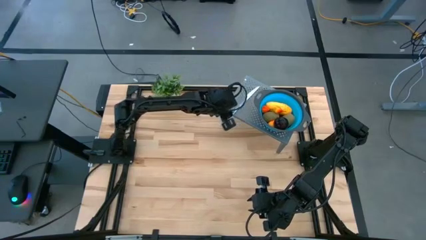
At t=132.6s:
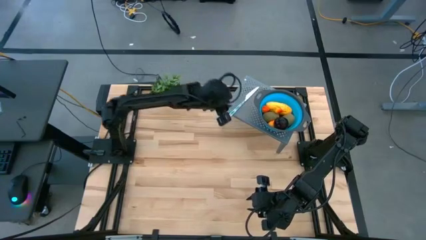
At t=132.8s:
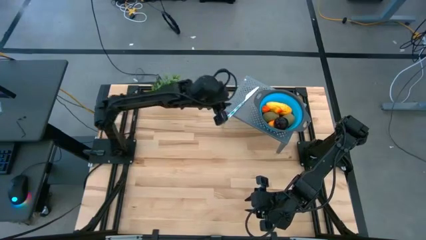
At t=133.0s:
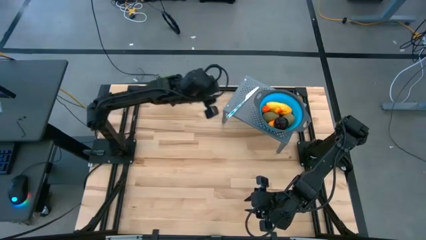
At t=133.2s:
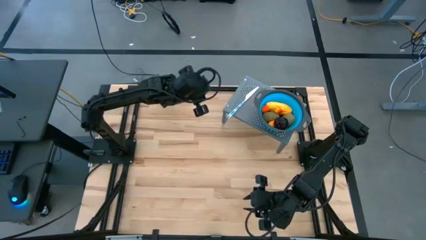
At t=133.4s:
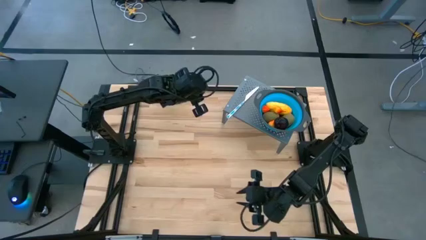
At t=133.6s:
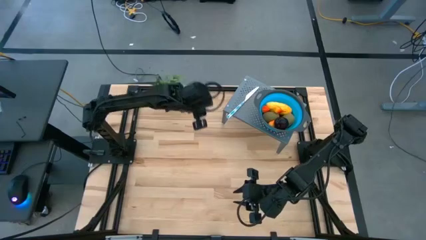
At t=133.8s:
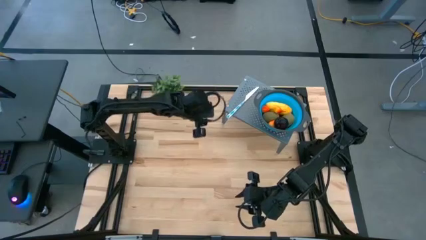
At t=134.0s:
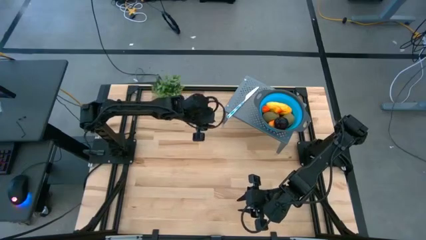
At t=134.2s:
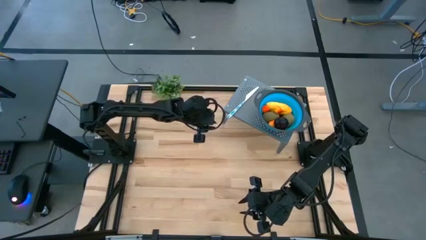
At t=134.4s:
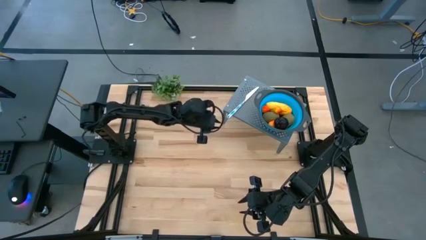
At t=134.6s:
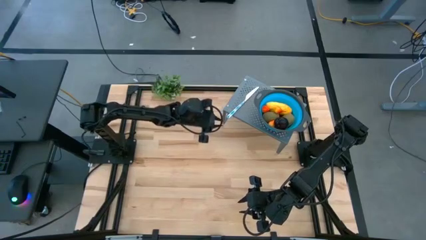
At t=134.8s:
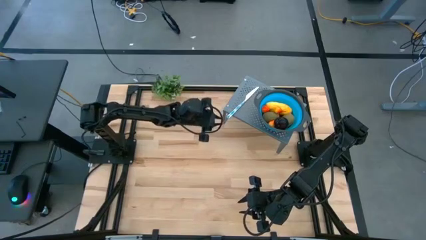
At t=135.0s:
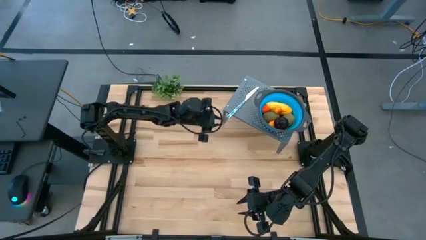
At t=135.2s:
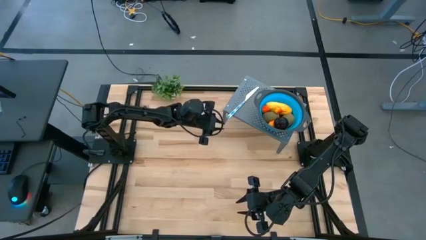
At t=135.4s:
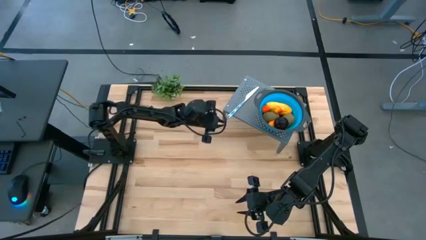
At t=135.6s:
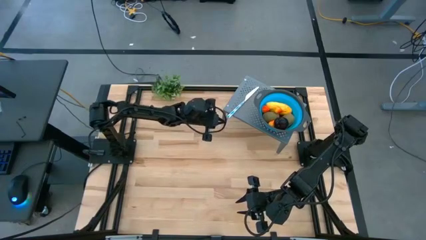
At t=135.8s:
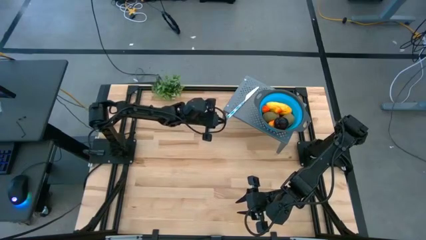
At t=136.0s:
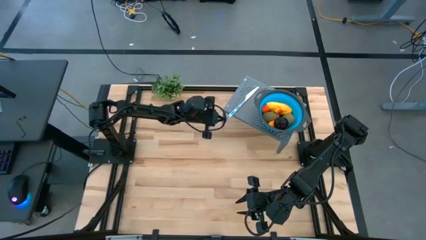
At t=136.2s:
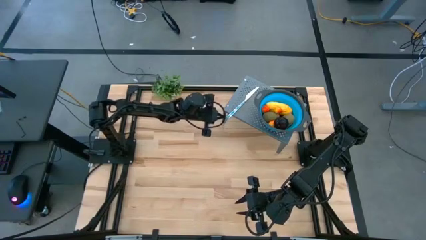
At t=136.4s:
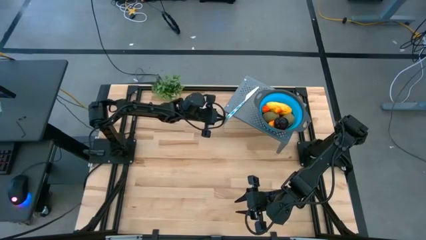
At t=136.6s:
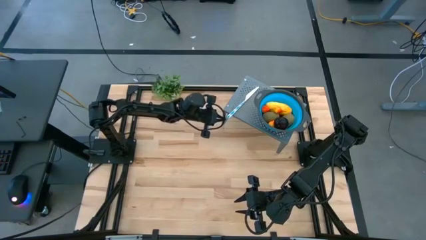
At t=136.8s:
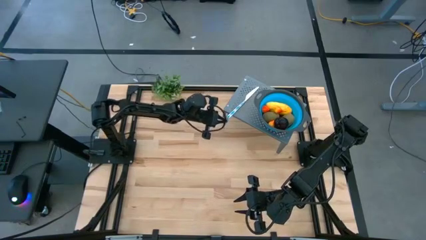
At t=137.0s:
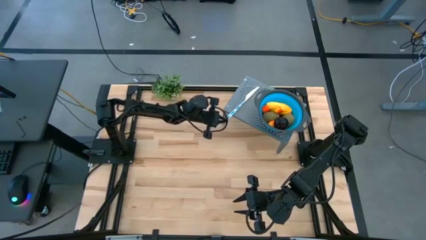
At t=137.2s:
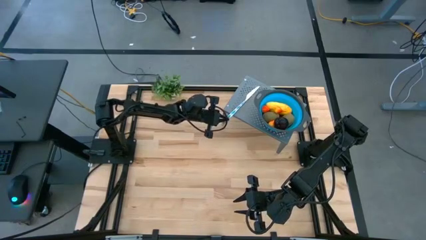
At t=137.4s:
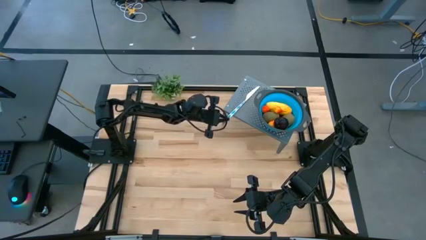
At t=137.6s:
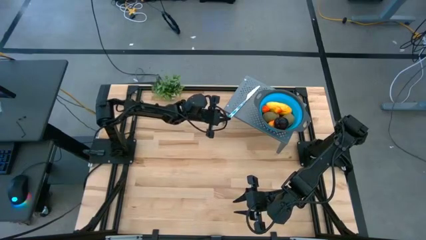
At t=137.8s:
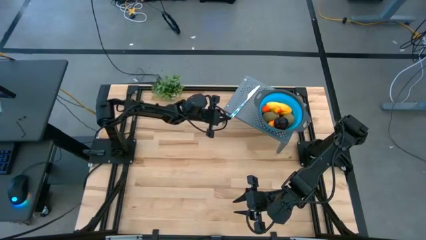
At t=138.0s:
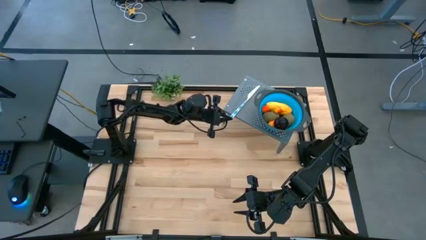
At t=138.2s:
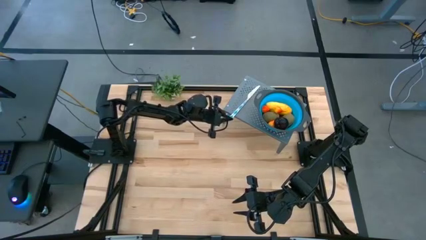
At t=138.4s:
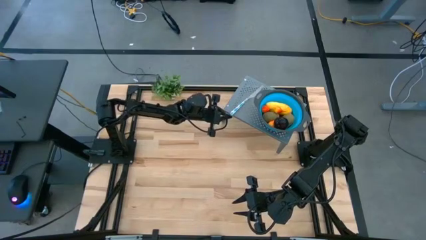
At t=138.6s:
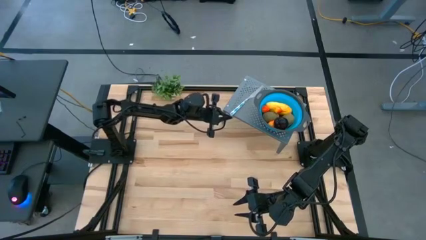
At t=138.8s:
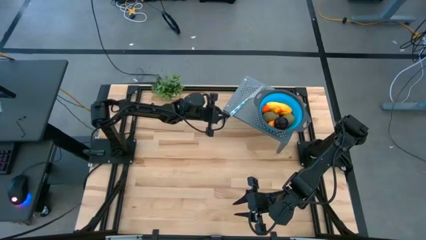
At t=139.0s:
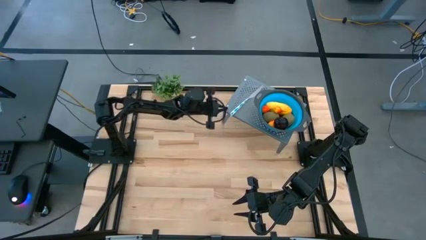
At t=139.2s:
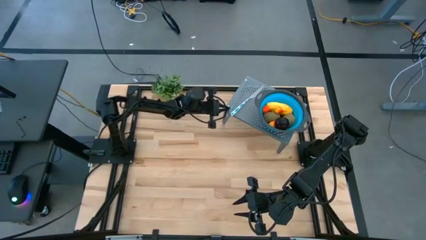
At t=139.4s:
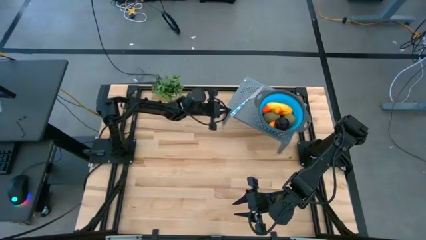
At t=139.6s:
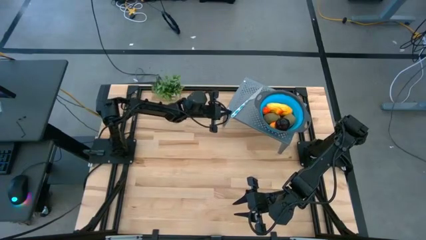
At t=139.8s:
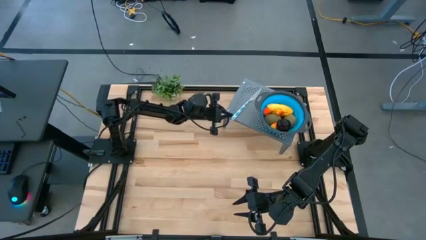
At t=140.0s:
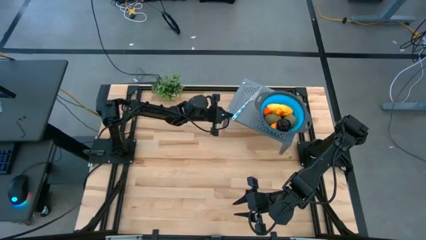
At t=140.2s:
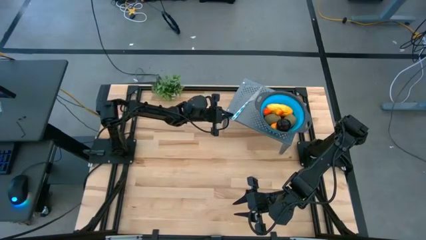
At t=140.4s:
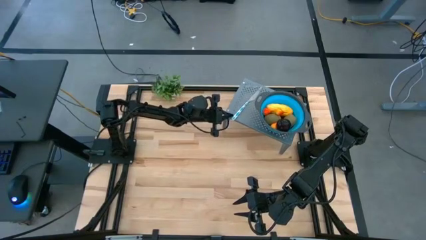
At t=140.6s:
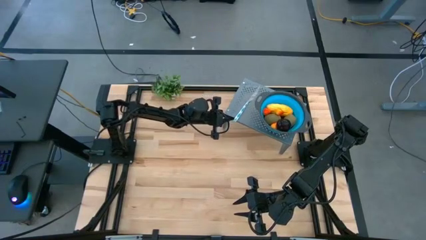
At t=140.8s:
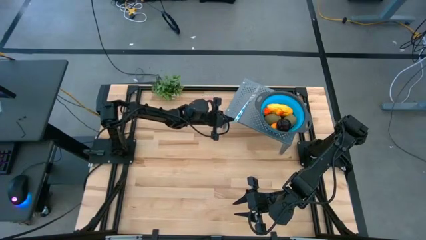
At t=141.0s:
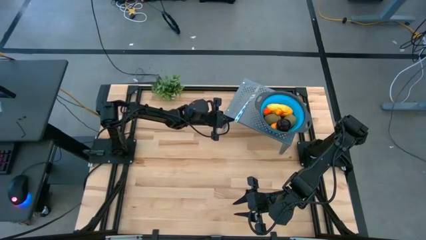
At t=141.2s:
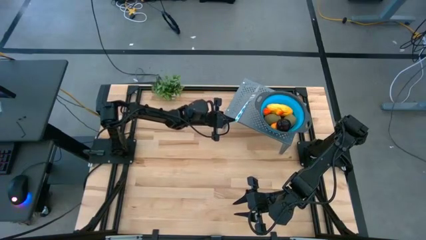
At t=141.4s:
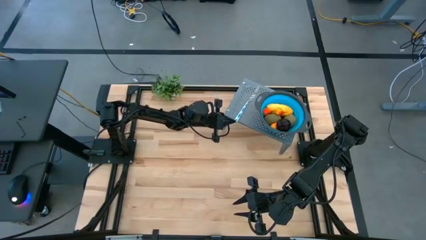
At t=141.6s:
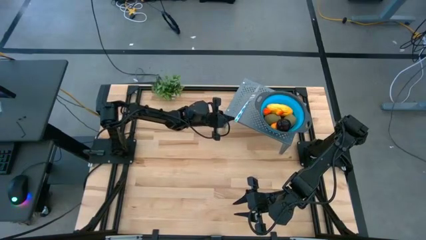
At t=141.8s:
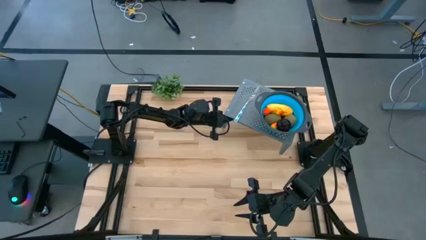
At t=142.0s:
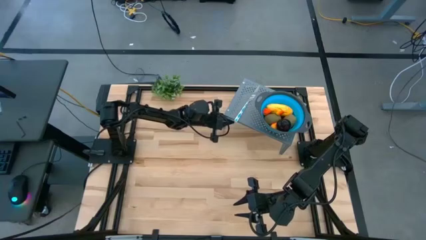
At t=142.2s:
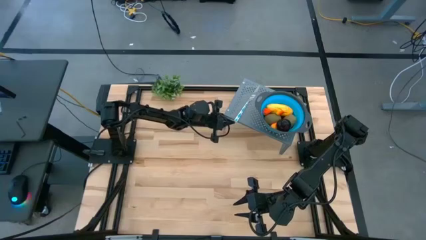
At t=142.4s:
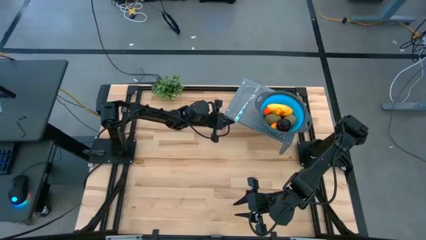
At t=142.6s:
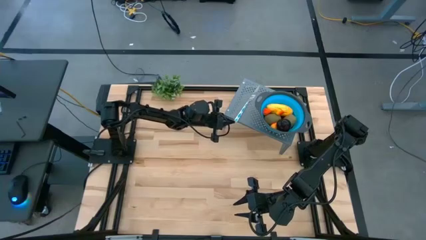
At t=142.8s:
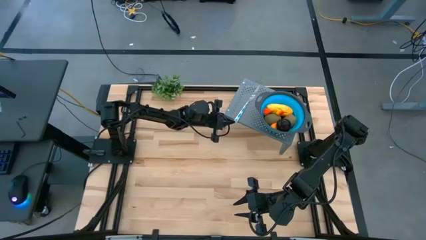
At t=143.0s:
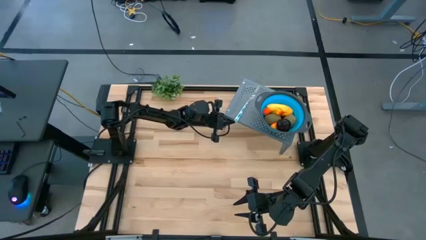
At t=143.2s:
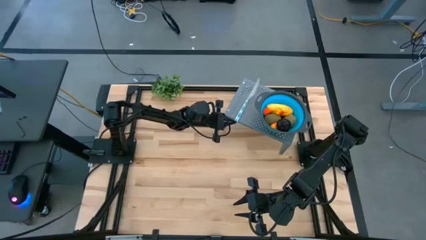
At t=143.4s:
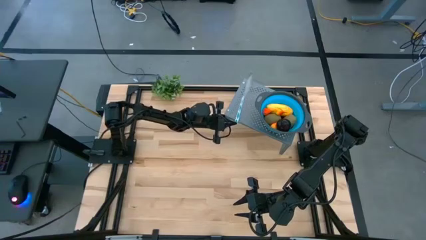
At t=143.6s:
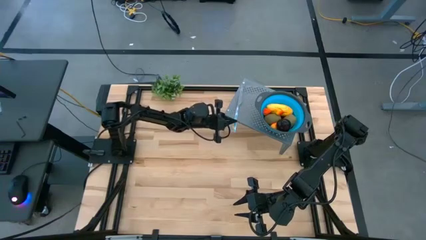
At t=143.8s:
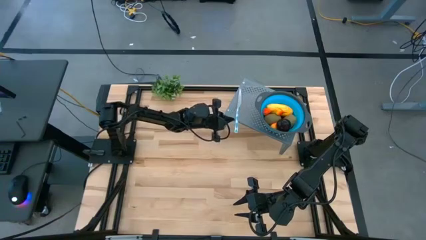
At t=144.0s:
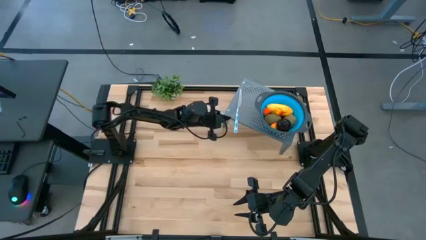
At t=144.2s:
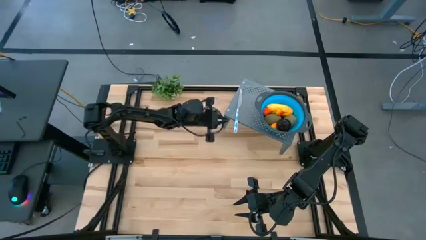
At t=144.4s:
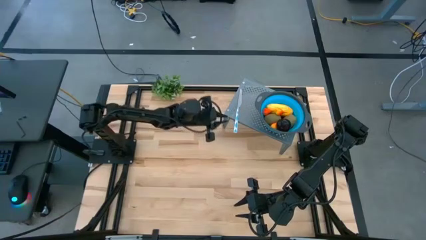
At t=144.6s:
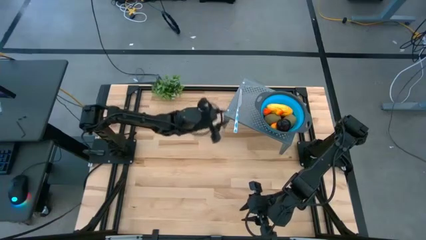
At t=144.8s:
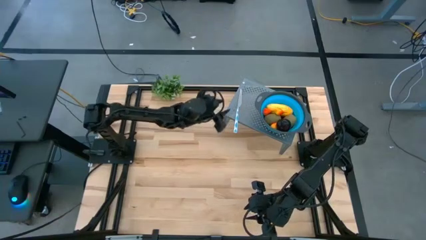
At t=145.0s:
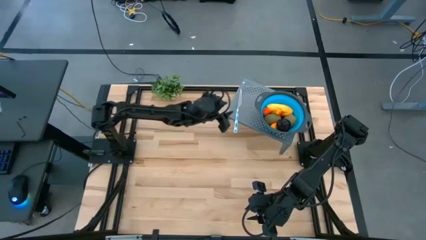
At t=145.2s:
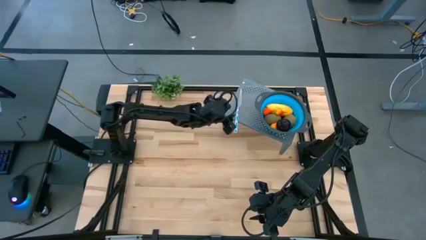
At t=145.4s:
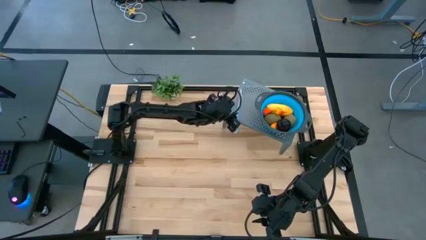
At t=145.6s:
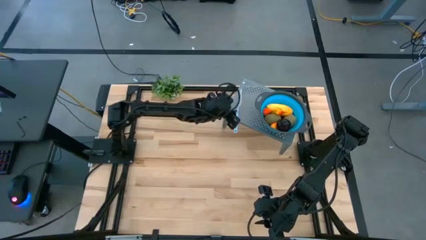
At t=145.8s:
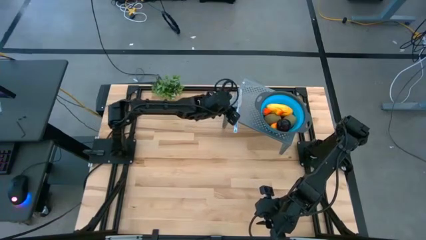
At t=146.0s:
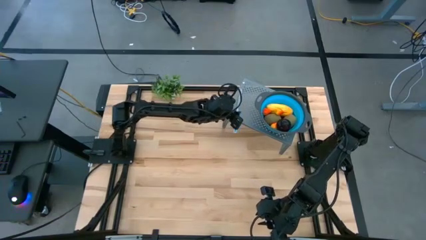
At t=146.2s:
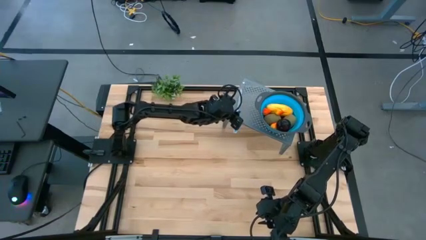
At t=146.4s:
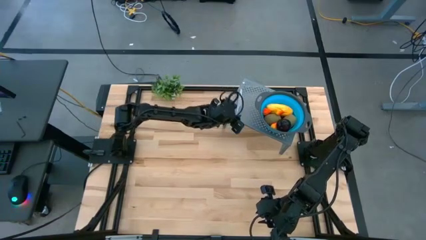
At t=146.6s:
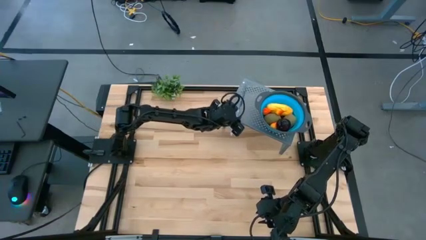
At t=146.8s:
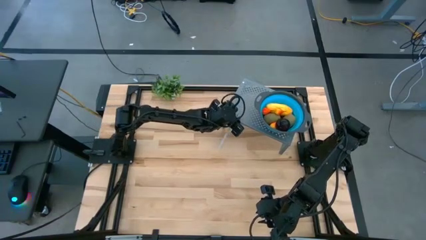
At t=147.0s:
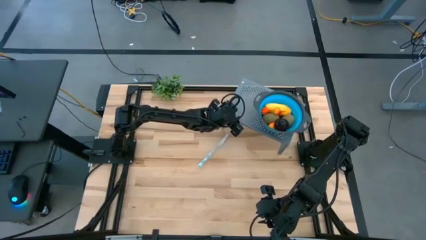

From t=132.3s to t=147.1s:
Task: Pick & Place Fruit
Put the knife on the shelf
